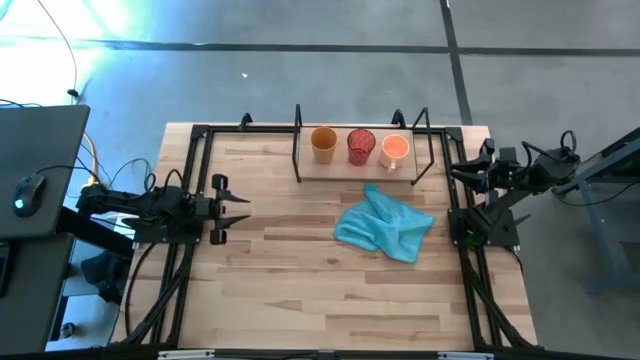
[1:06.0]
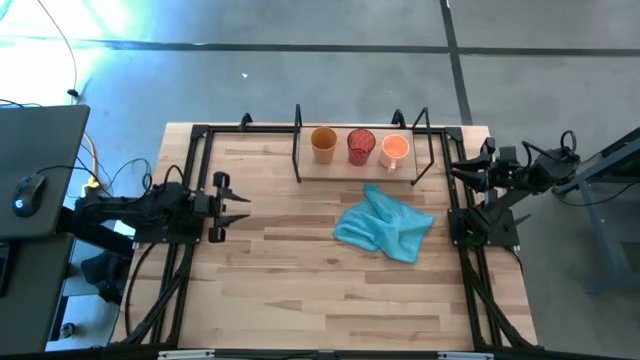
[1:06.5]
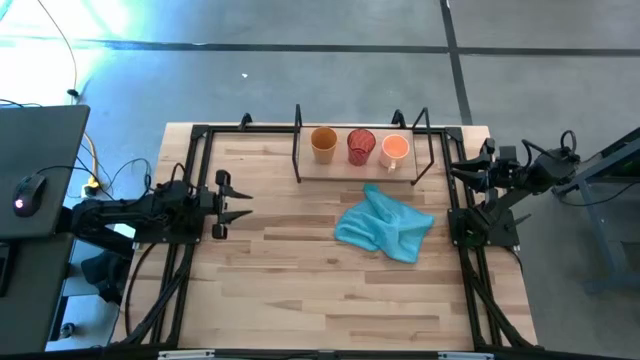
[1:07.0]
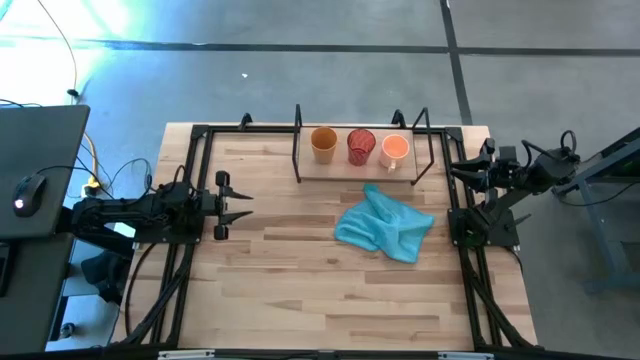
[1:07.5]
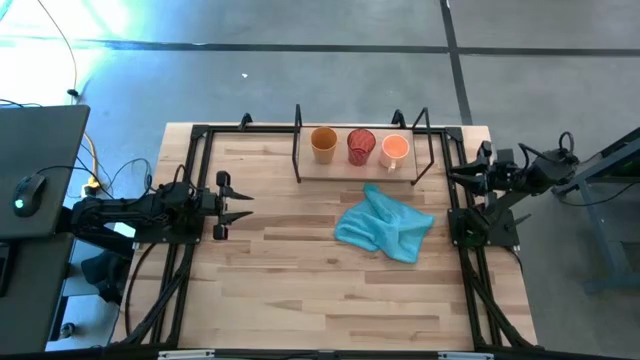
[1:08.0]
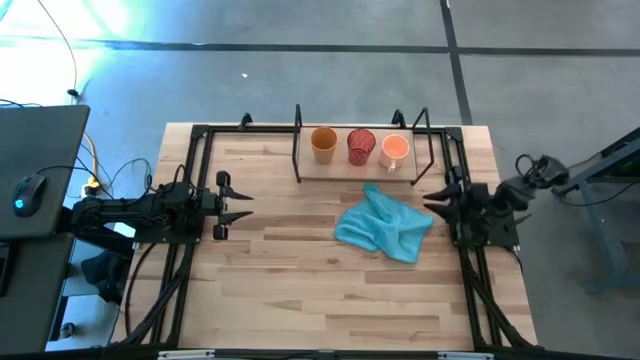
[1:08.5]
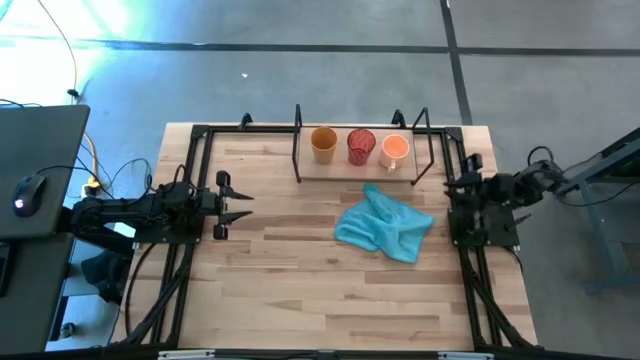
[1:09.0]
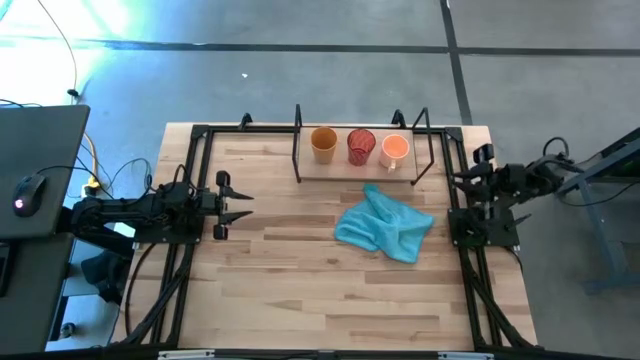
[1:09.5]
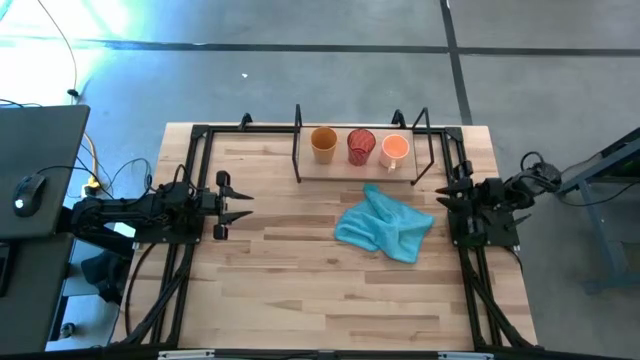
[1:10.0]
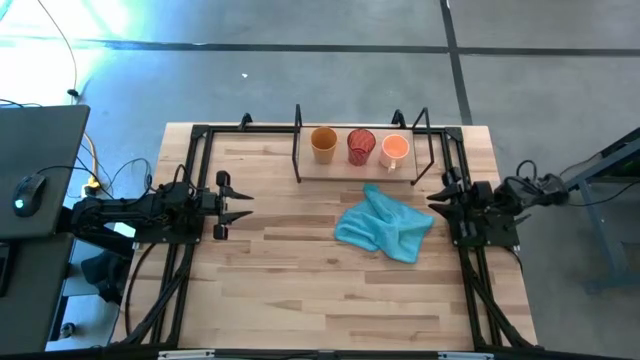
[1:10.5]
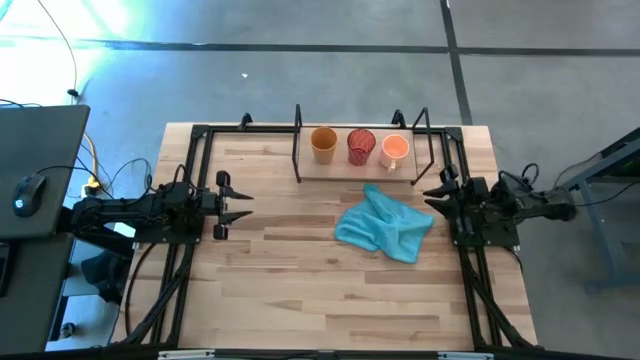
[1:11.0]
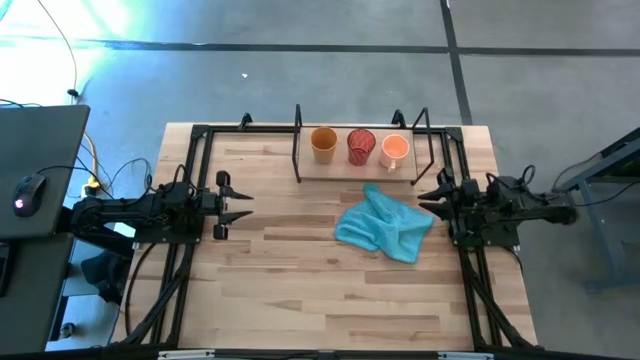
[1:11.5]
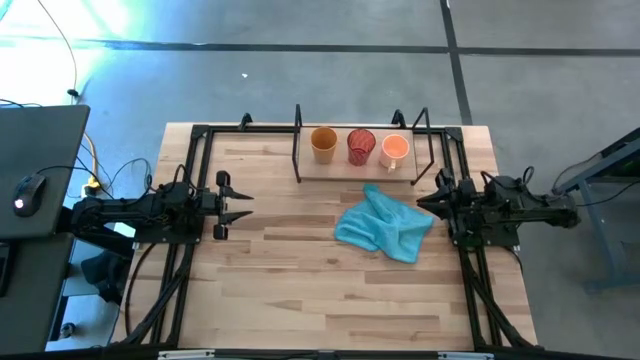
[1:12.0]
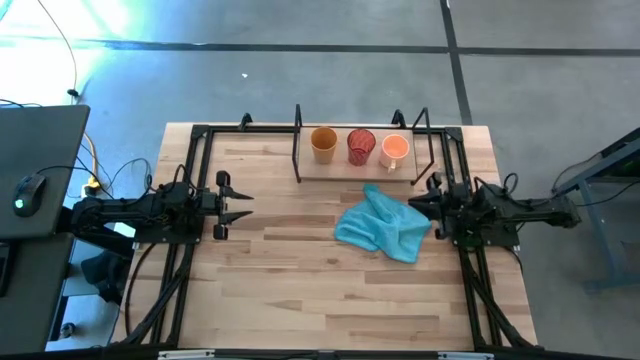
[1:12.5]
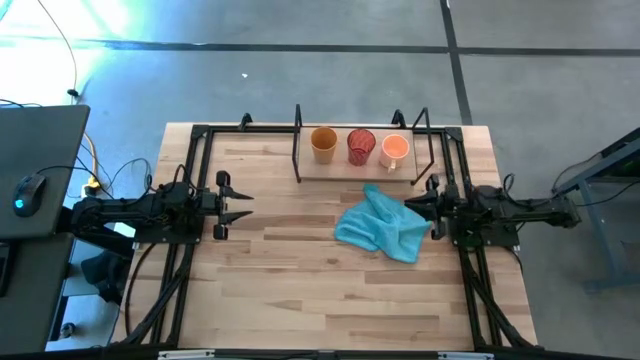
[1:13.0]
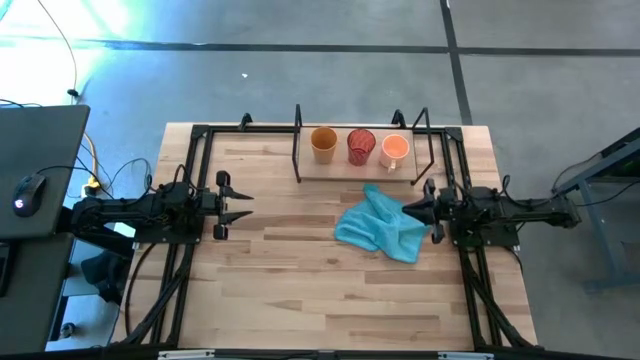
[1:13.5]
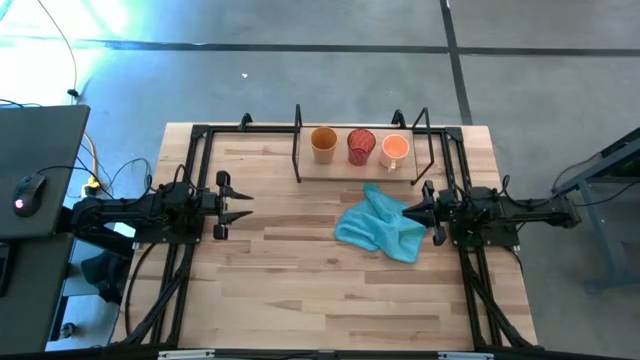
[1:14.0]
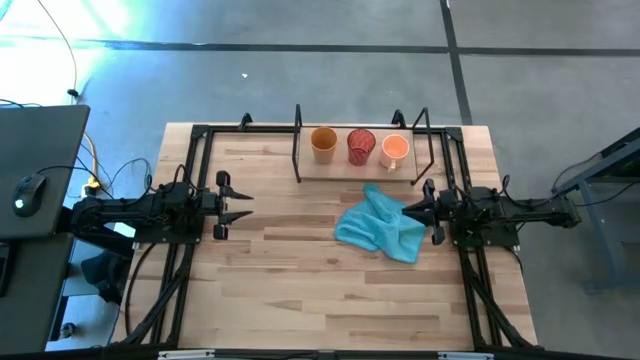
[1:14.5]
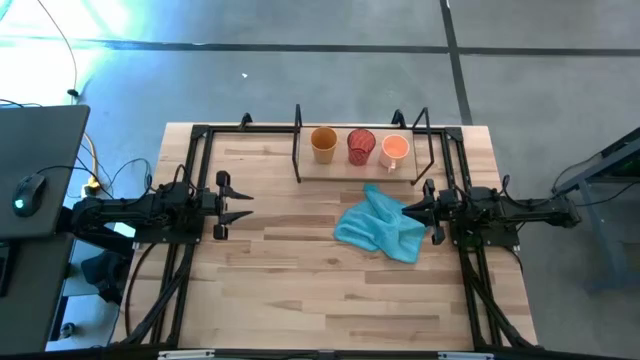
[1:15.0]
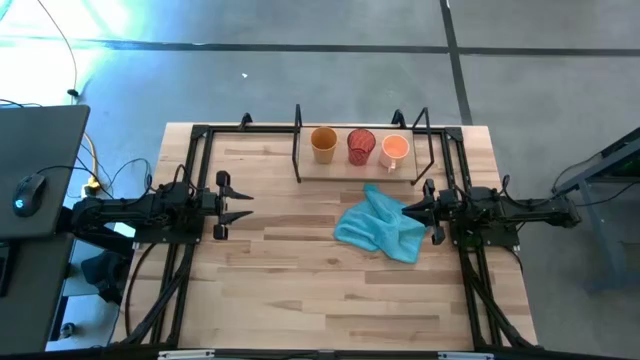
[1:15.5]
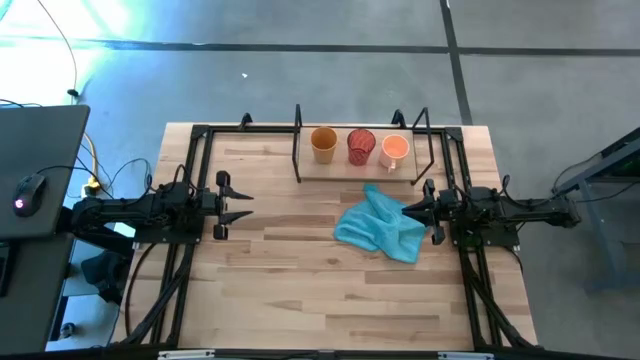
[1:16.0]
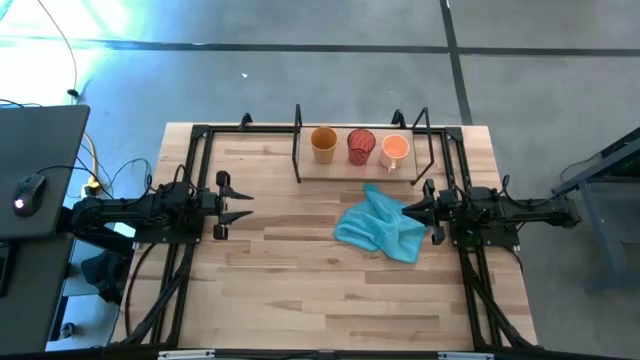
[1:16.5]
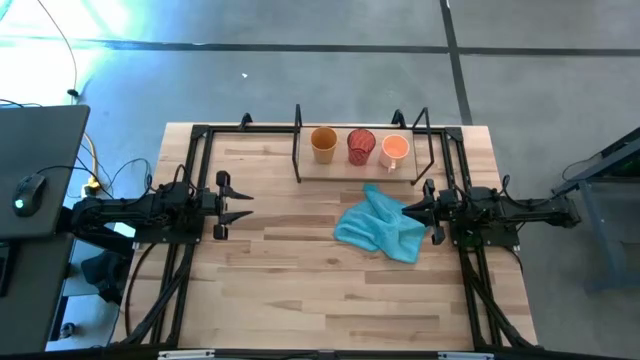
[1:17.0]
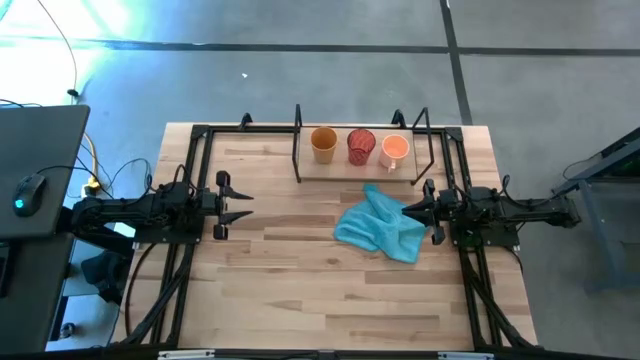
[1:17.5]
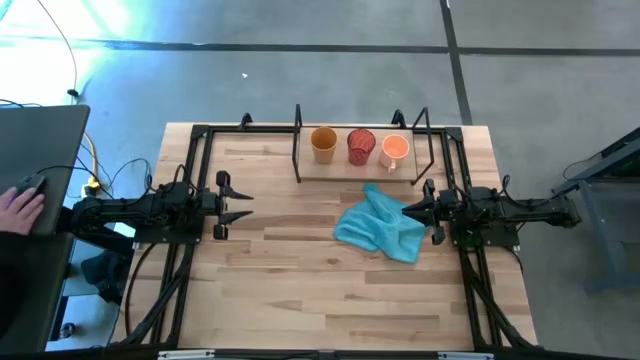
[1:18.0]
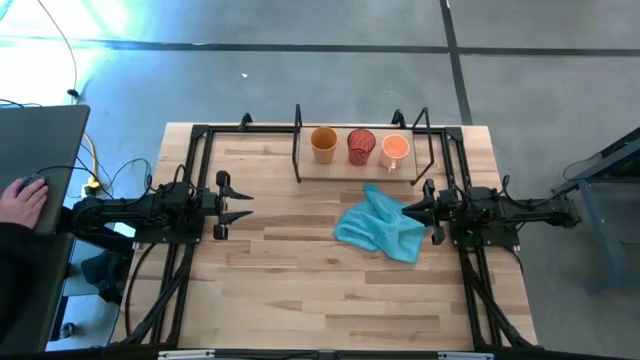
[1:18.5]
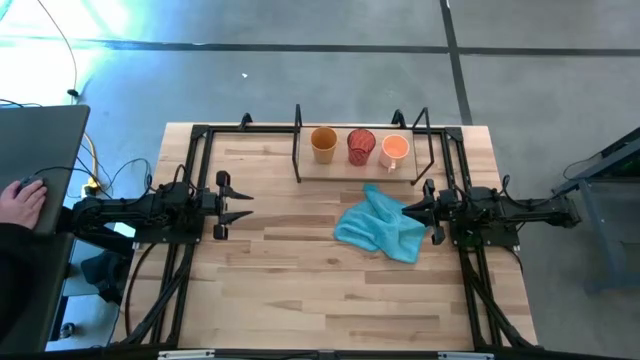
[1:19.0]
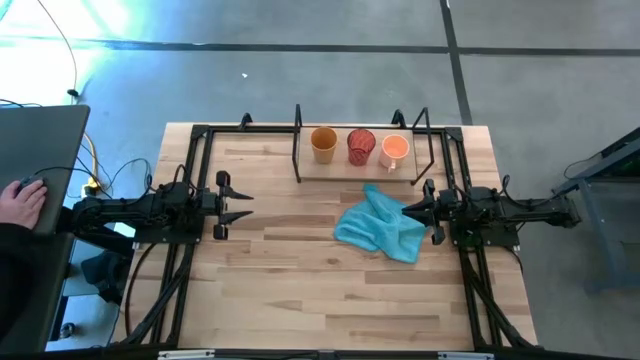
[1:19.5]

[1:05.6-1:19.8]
Task: Stack small to large cups/mugs on shelf
Return to Home Position
